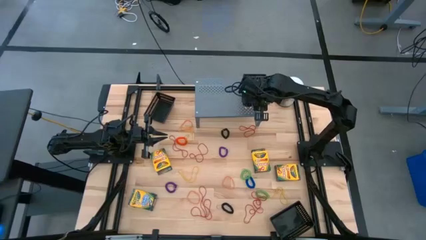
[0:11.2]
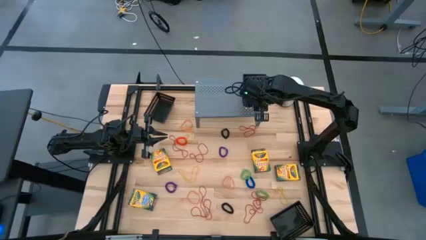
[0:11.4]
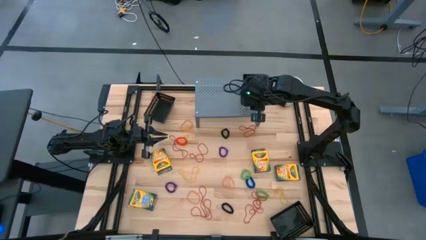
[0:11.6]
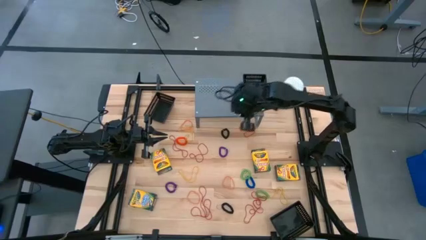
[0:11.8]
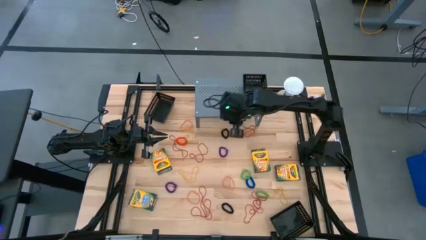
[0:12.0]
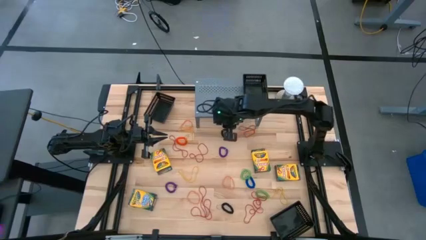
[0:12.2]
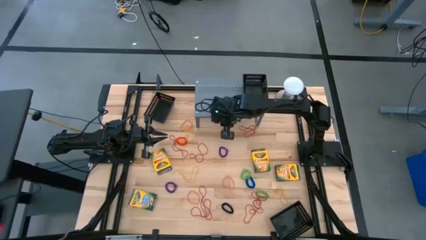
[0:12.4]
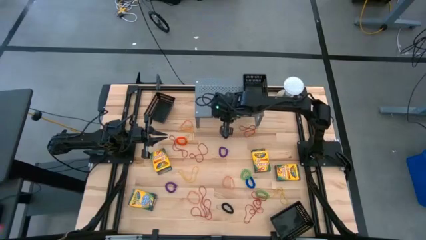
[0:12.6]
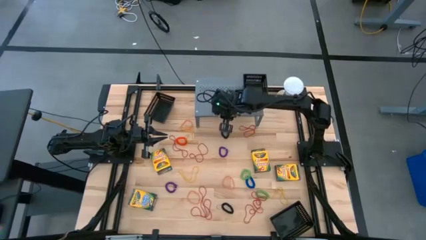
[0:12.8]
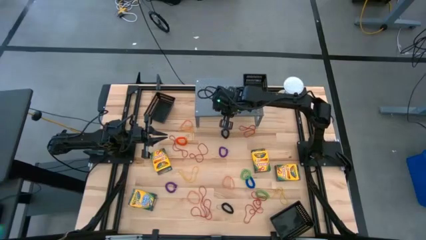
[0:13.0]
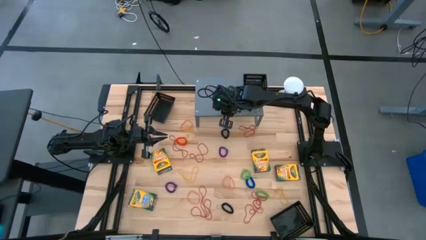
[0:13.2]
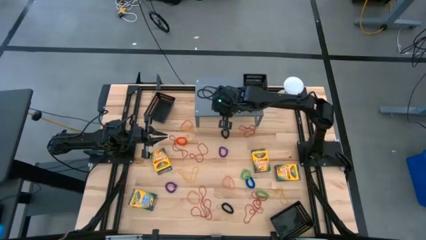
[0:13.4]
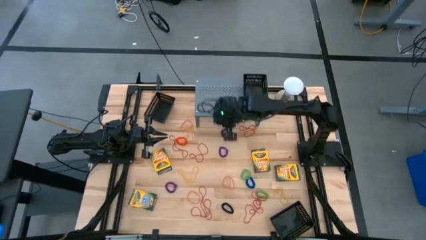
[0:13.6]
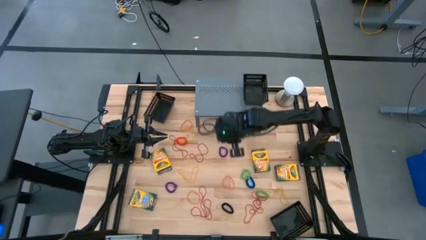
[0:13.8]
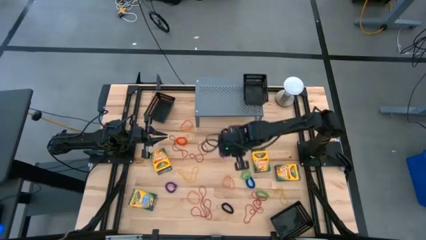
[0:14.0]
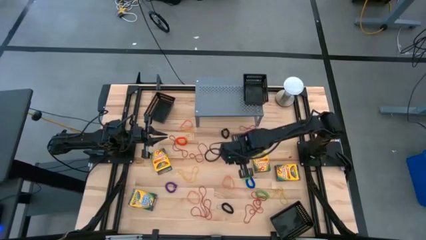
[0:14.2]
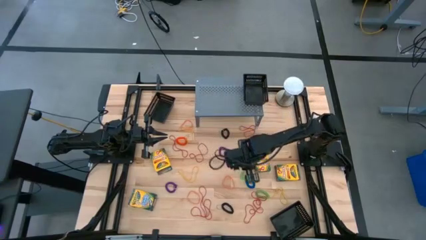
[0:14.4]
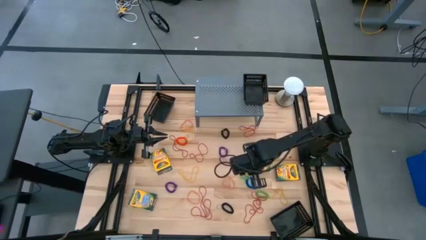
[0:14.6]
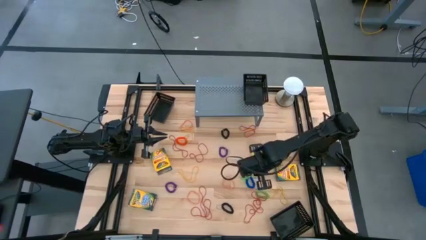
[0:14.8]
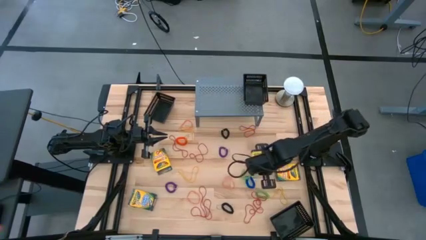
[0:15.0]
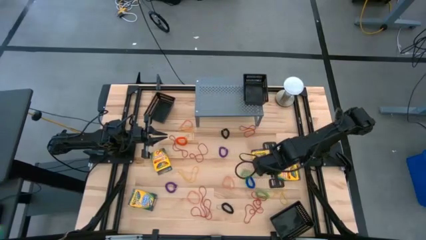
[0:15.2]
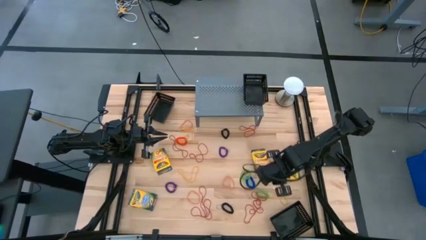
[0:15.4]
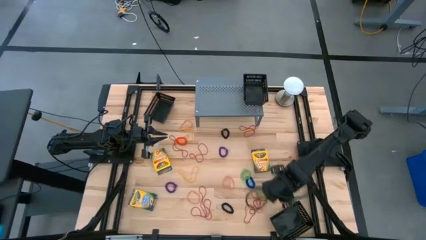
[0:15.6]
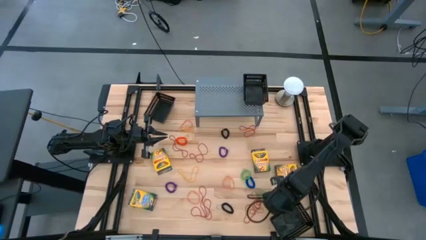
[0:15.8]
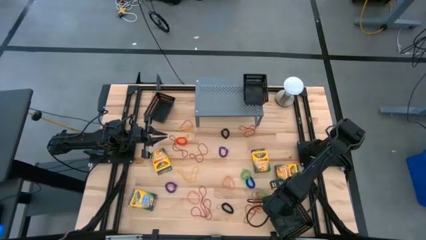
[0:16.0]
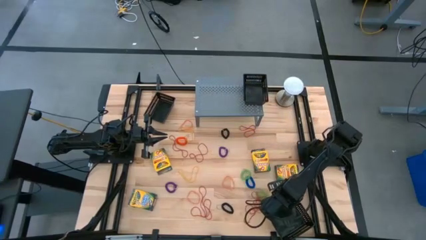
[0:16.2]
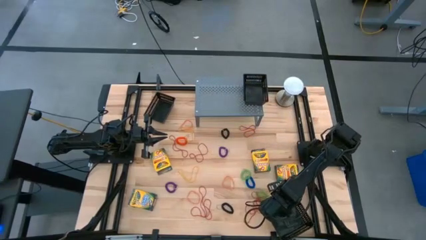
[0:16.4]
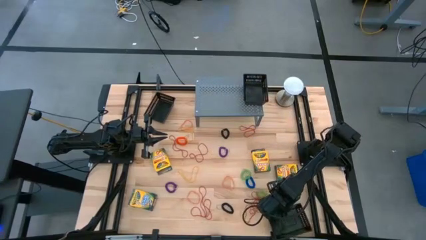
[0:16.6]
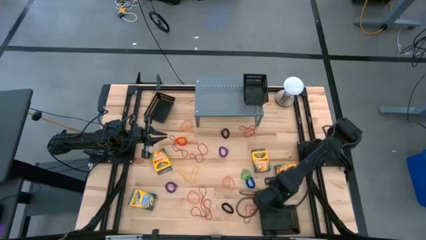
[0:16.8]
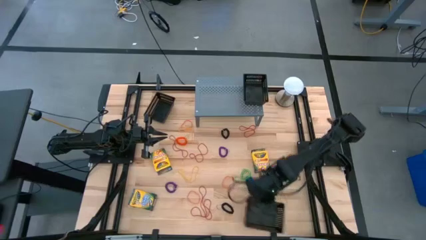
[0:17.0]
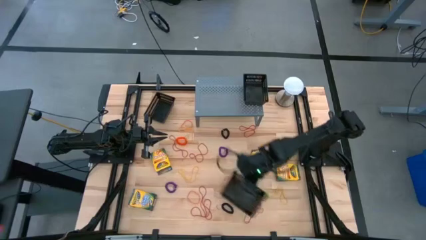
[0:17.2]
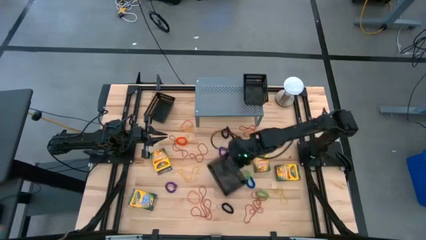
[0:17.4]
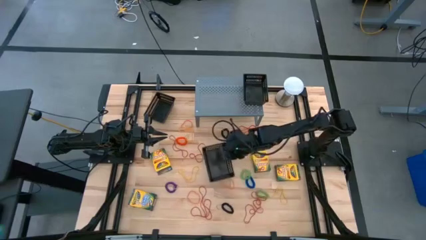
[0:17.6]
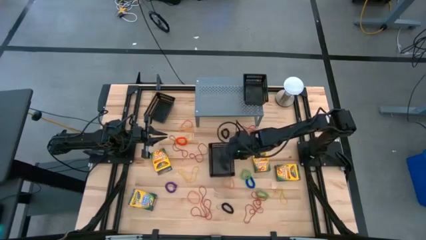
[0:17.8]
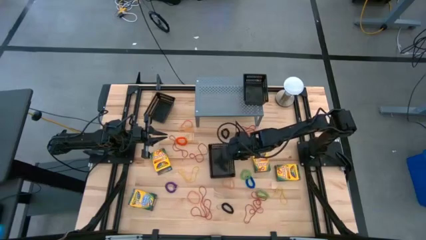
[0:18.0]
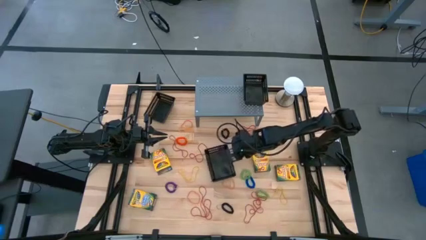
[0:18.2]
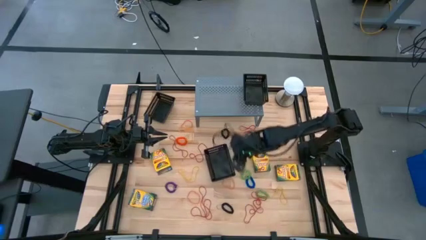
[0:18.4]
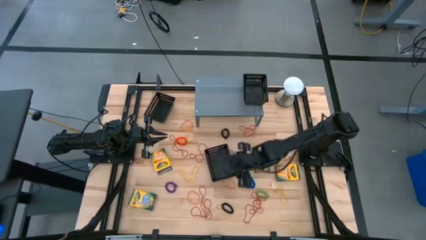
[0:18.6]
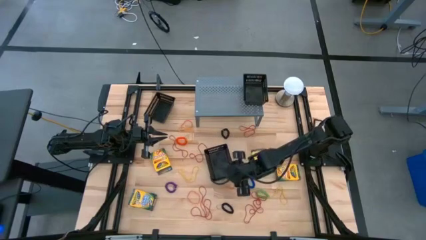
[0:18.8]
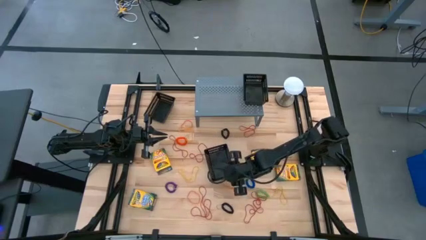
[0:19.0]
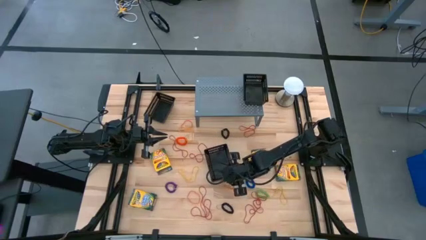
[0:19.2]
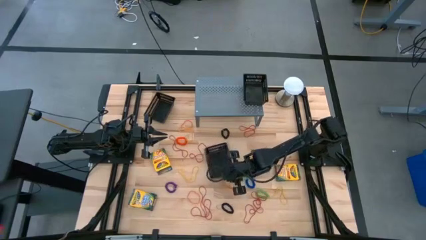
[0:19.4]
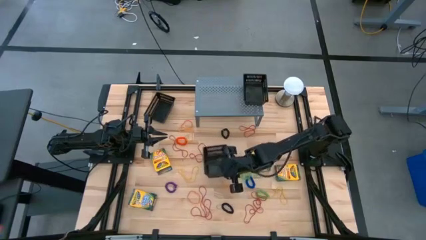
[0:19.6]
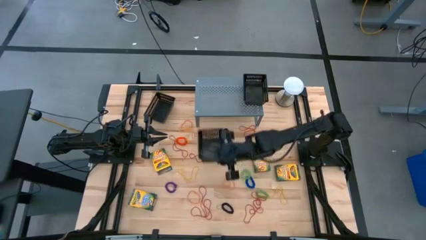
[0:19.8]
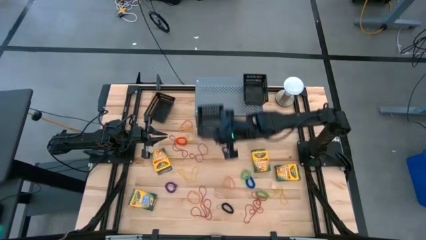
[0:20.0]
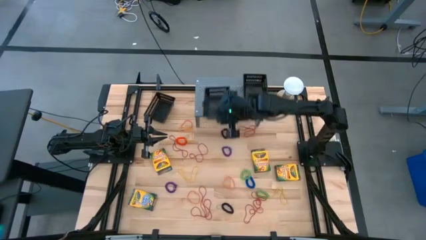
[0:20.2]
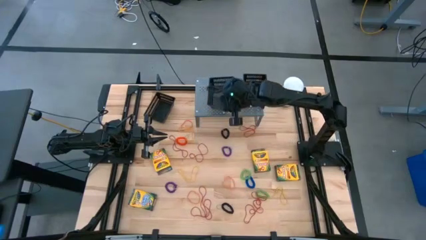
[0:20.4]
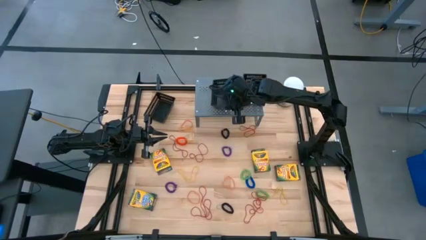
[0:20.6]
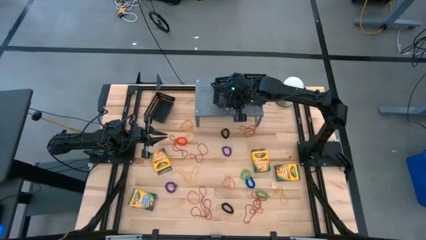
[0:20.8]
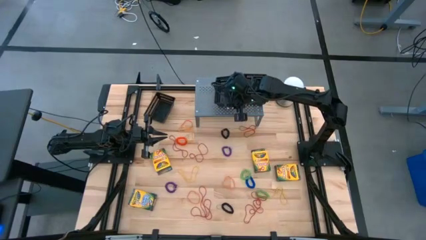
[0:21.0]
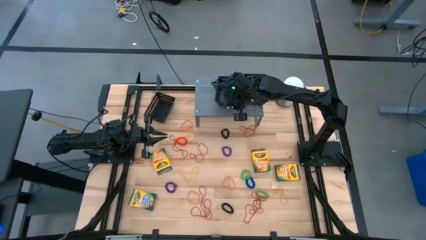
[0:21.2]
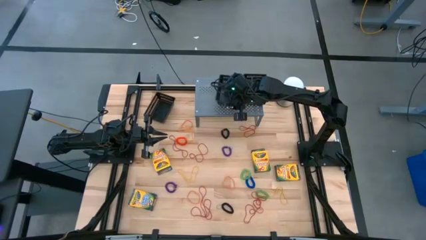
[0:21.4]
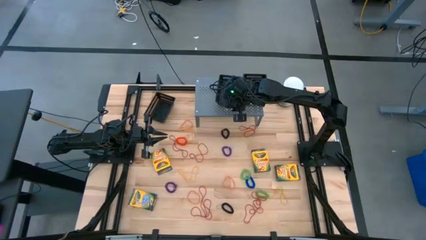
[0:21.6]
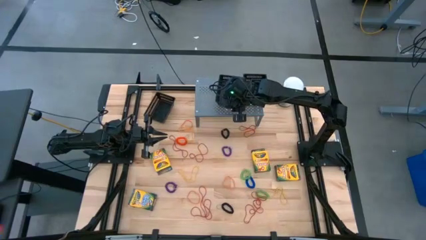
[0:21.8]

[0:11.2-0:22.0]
Task: Sort rubber bands into baskets
Put the bottom black basket into the shelf
